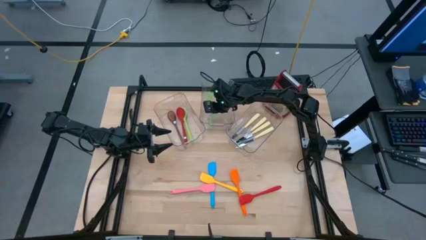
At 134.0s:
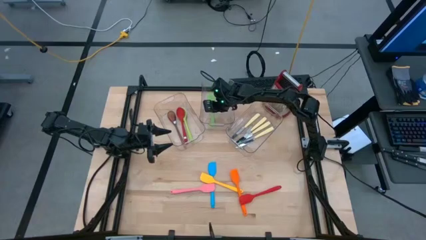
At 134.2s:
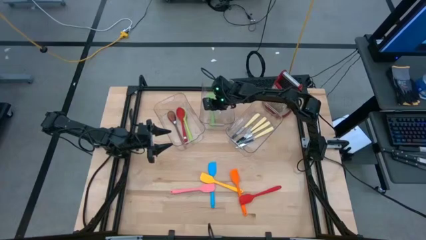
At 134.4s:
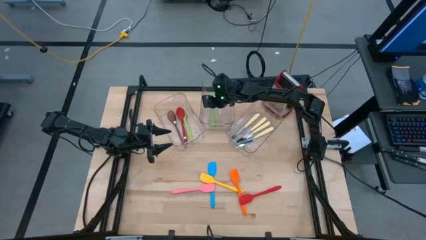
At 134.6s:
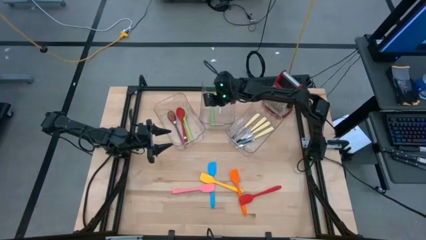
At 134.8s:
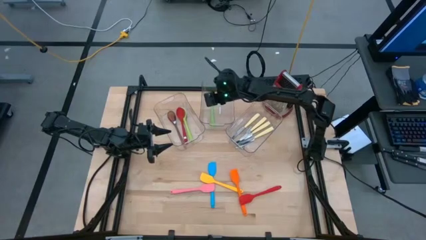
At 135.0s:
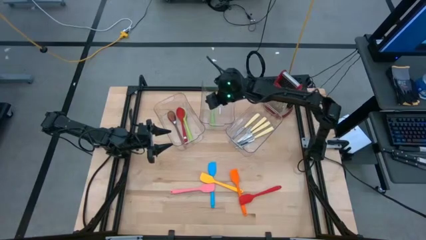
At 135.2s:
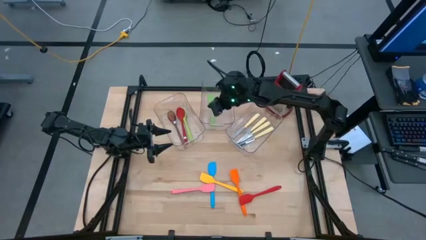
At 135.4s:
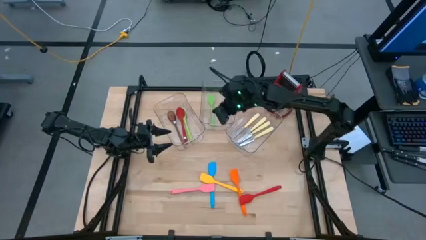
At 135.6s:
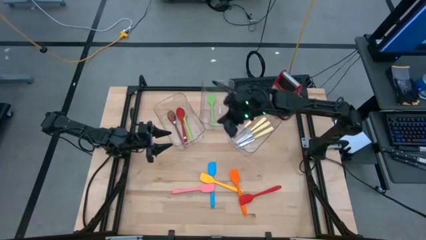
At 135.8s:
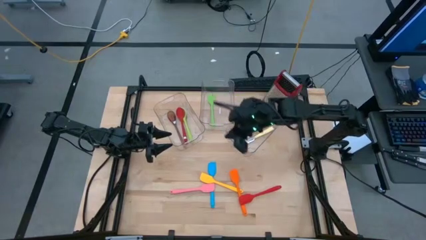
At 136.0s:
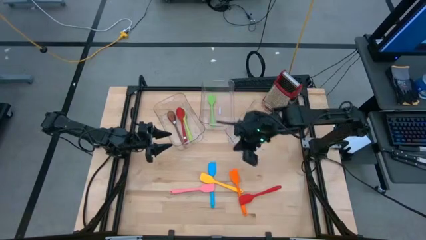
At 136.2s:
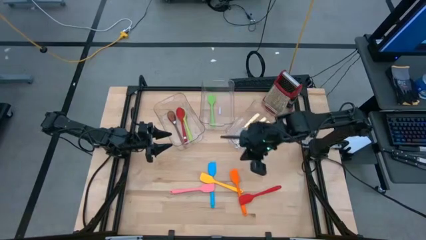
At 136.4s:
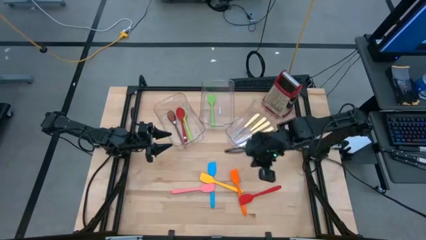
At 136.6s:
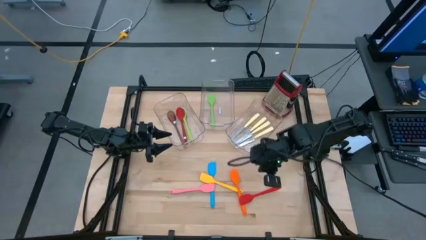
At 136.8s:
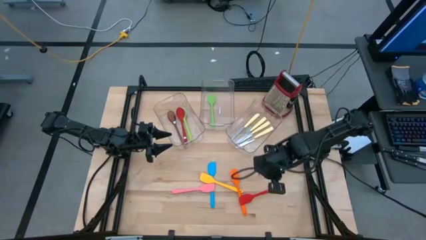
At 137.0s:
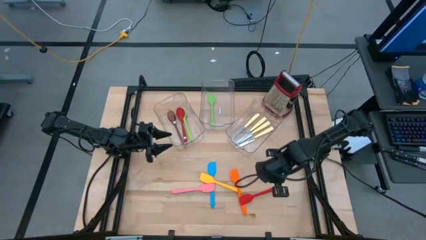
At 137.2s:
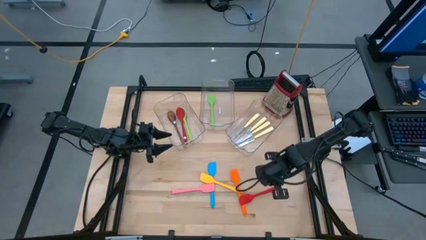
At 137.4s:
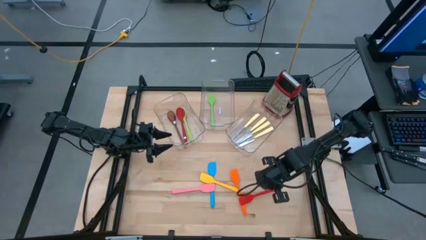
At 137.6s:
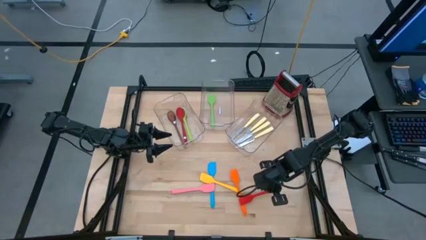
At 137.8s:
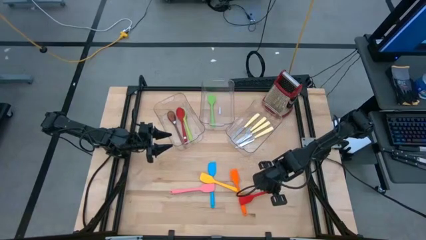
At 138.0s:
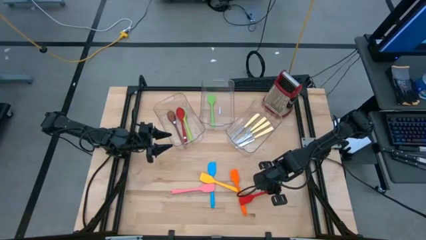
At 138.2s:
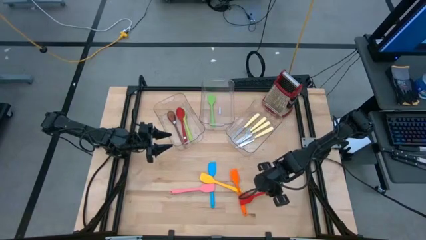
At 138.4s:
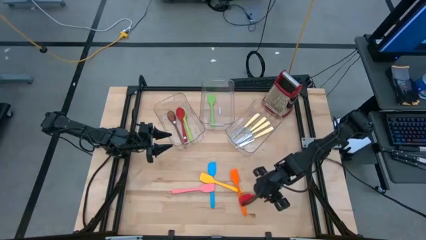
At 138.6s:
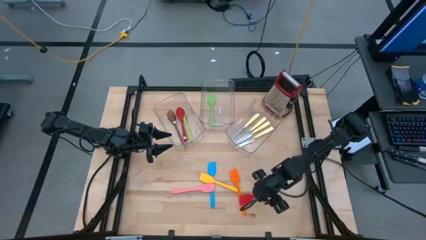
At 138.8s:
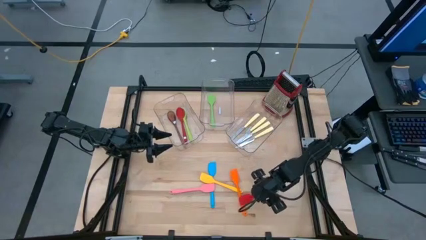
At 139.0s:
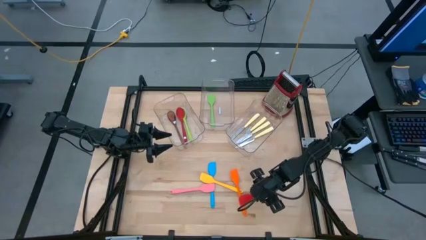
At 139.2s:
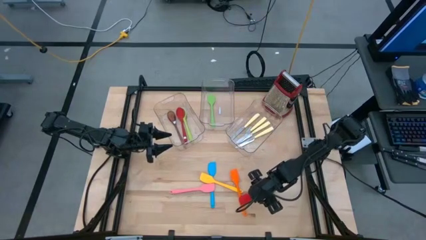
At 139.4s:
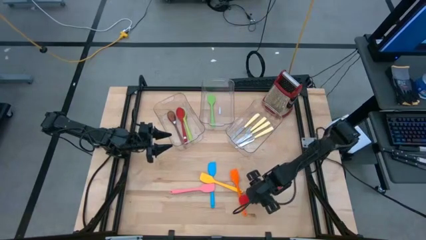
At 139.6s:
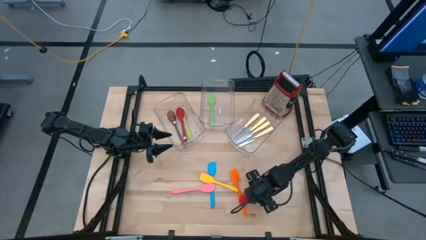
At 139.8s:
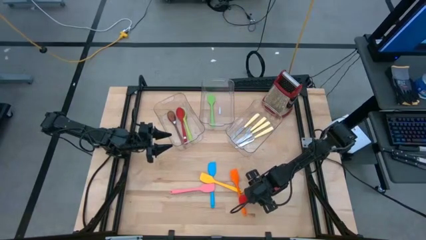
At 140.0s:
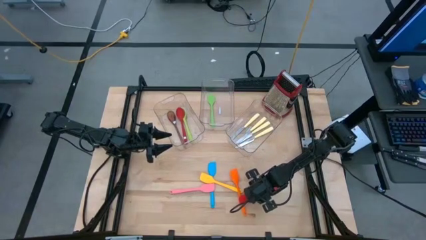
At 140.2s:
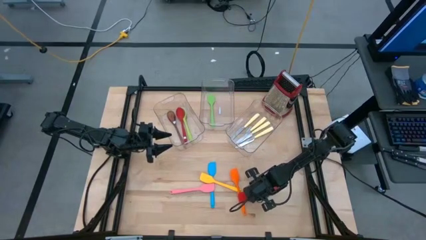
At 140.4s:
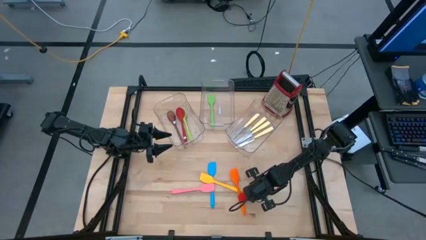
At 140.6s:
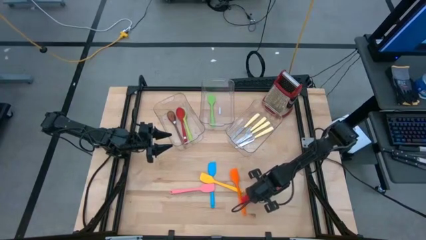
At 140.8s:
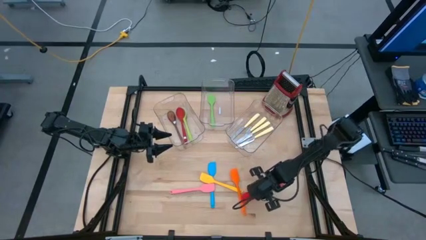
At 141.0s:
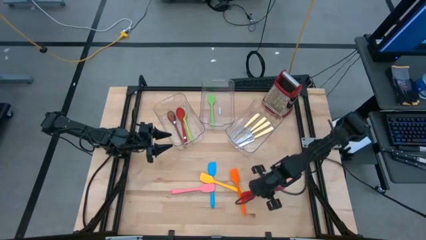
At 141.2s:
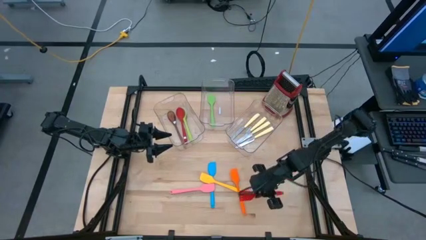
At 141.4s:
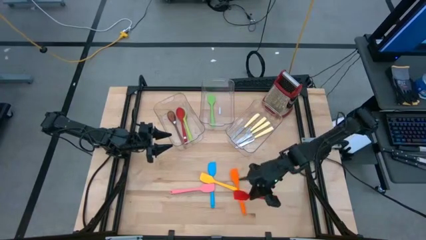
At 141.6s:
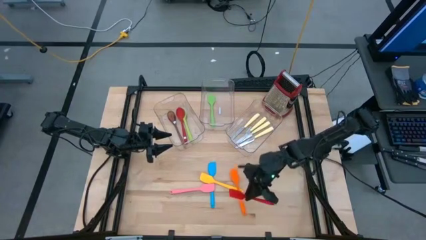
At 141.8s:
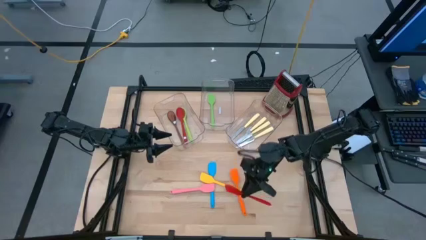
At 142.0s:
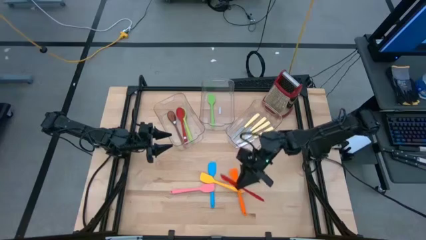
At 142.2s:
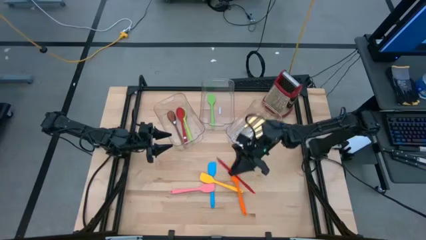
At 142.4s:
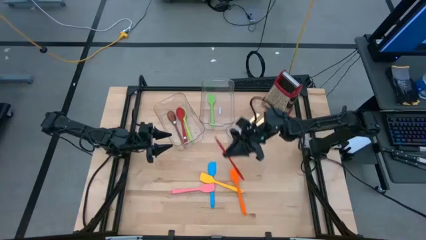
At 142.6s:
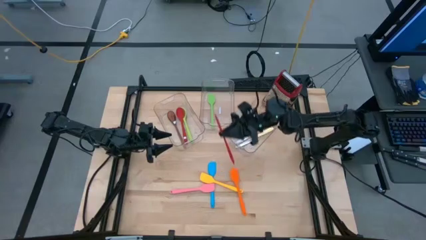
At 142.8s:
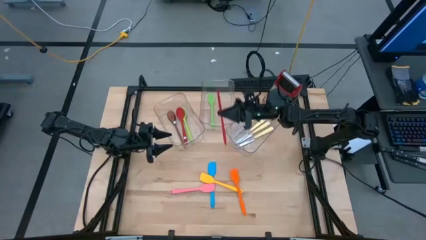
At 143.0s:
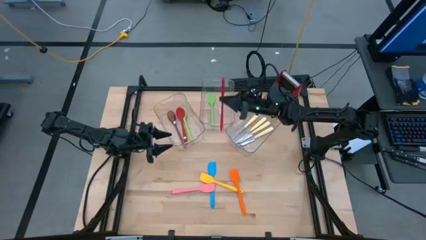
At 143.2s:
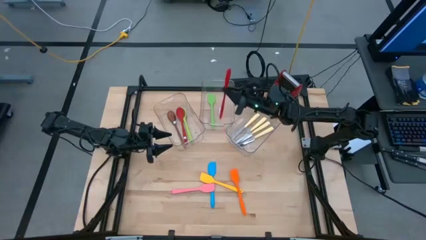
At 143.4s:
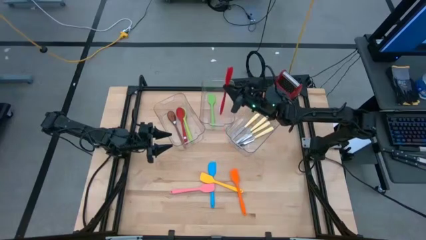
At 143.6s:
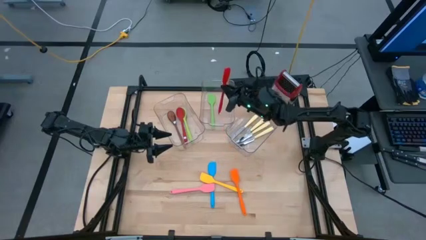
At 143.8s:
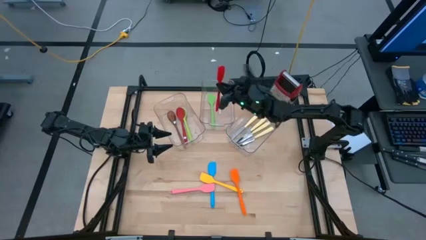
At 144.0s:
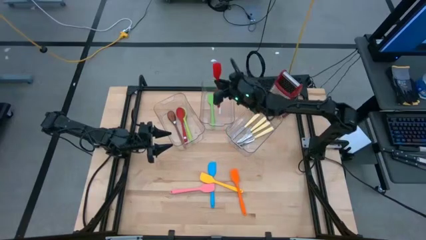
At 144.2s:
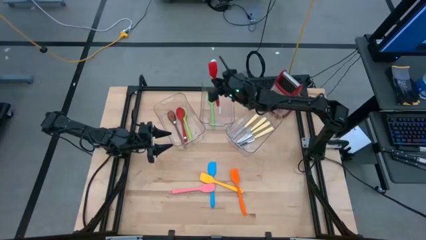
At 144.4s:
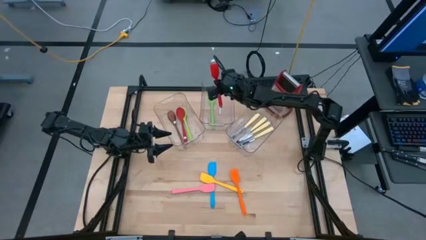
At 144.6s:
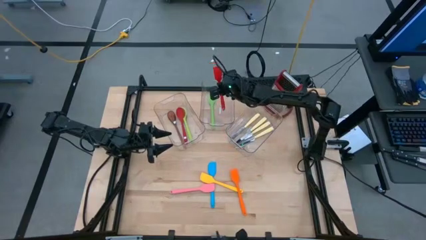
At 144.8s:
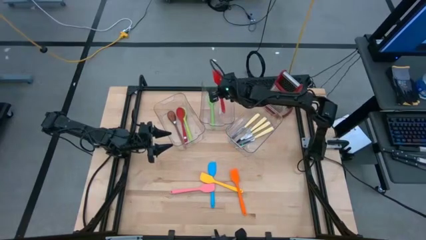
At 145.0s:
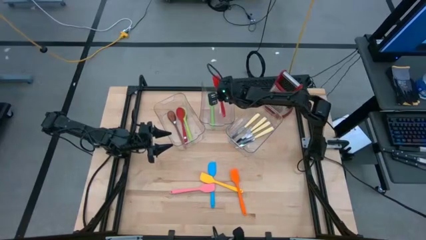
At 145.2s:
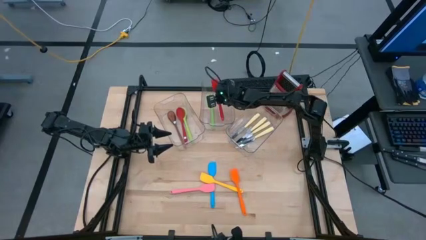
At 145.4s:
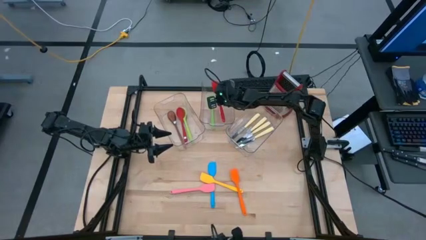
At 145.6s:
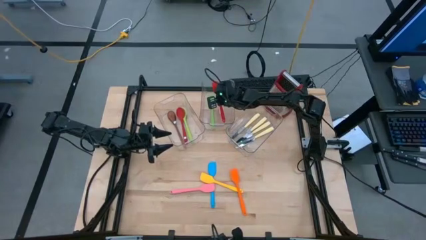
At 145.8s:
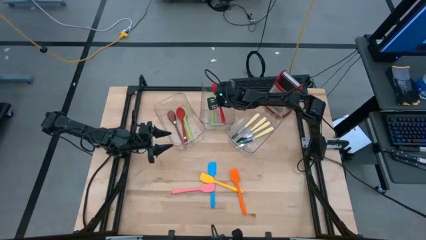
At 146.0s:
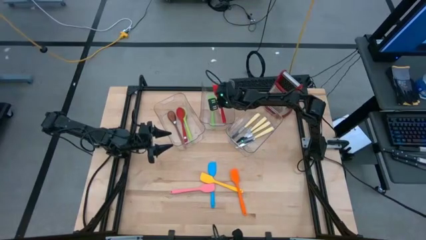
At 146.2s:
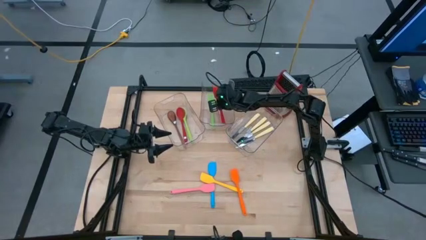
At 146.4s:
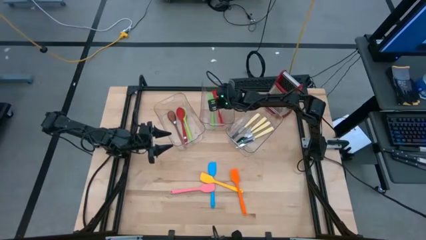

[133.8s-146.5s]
Task: Pick & Place Kitchen Items
Put the red spatula into the middle transparent bin

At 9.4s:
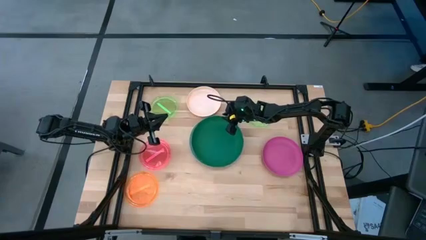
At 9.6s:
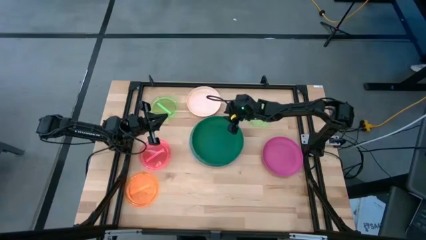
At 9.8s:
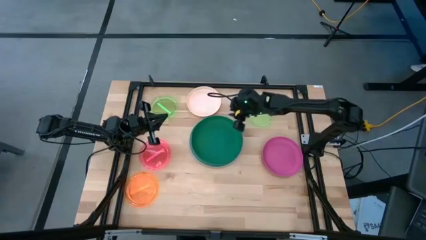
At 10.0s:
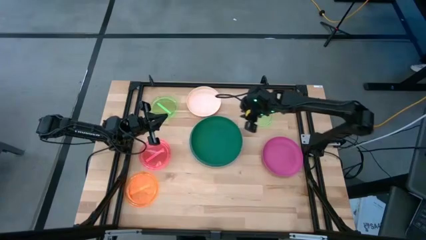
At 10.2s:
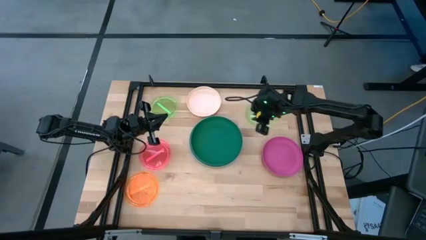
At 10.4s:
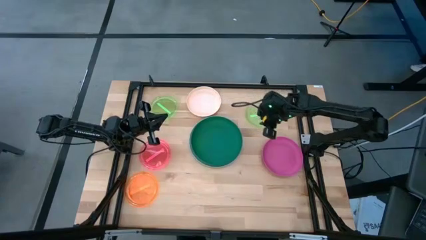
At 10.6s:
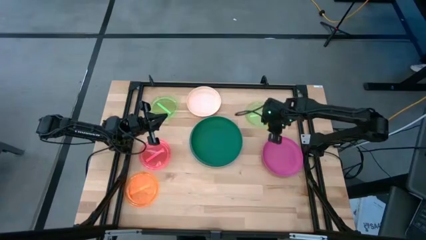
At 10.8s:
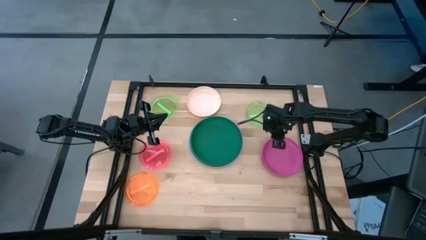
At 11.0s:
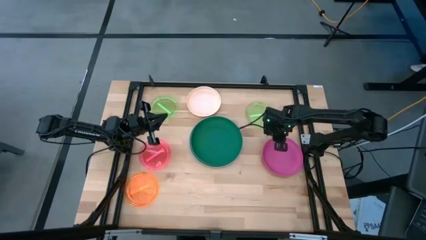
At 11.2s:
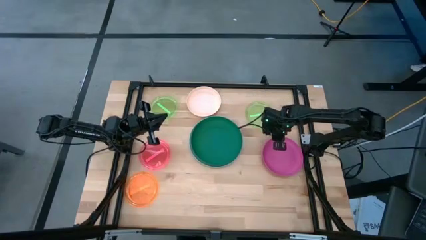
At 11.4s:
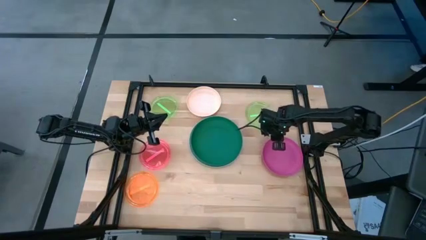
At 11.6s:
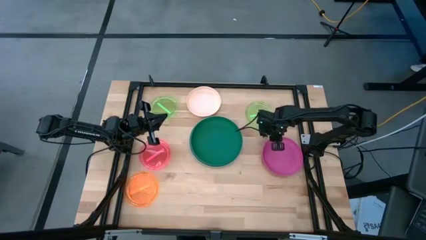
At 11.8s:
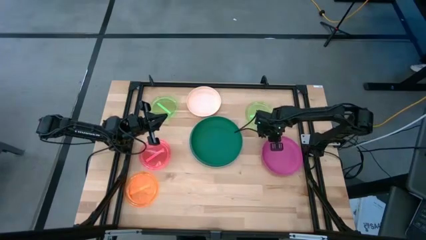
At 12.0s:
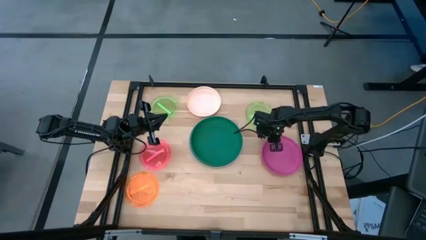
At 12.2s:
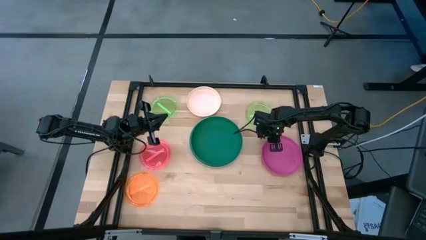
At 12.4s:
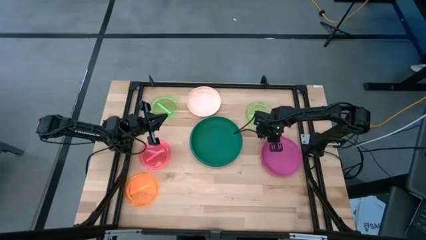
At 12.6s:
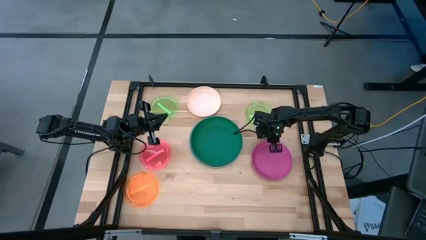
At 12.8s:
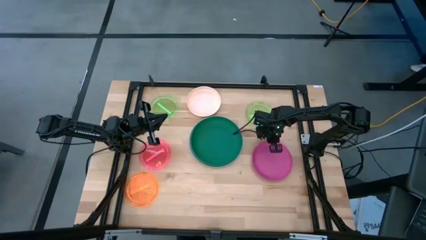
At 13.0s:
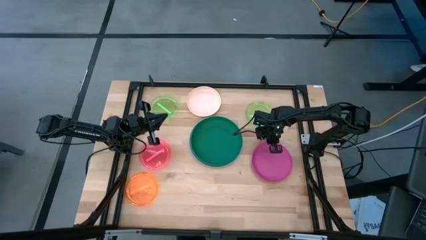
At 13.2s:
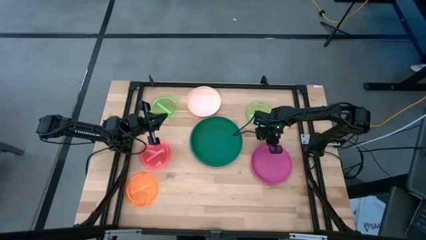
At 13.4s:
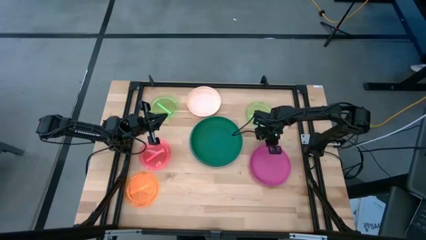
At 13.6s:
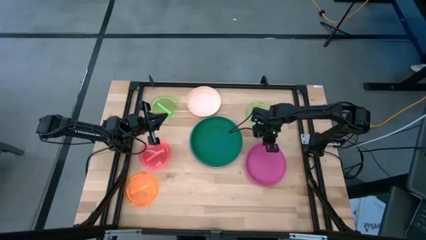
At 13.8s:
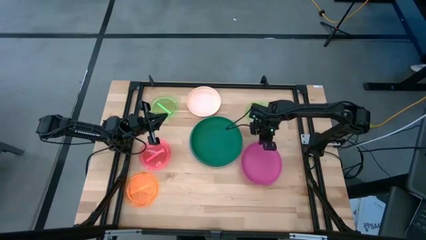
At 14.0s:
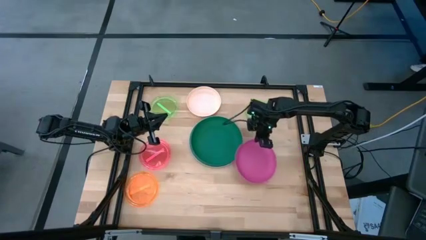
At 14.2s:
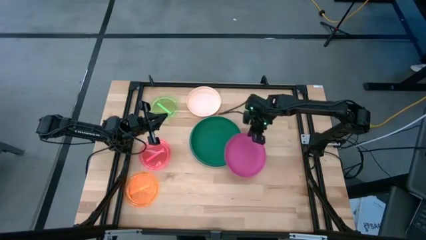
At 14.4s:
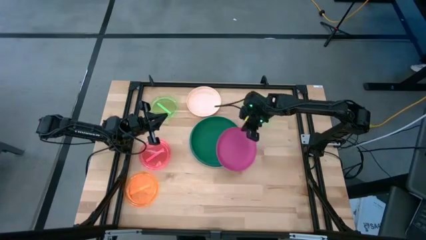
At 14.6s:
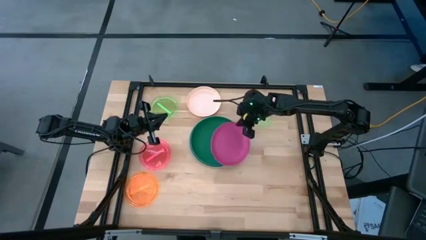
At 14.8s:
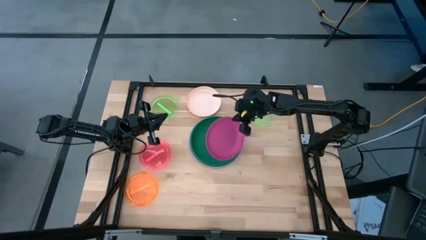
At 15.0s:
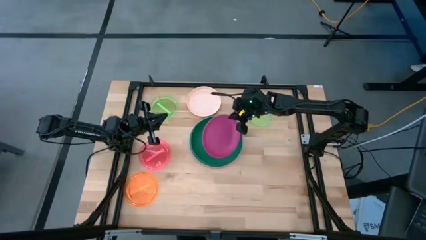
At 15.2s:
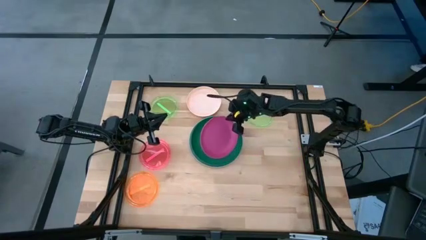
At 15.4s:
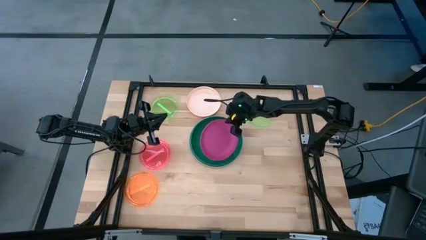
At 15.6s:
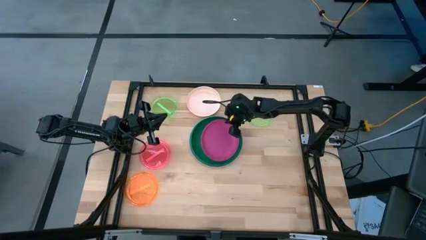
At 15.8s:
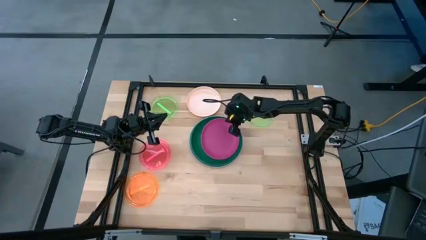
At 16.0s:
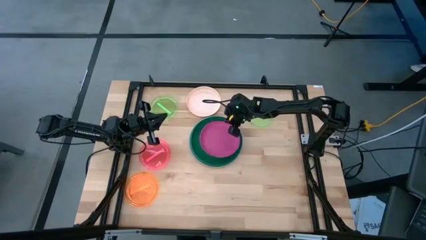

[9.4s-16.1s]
Task: Stack plastic plates
Stack the pink plate on the green plate
